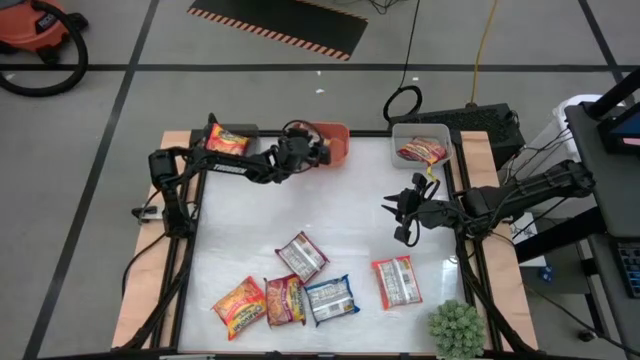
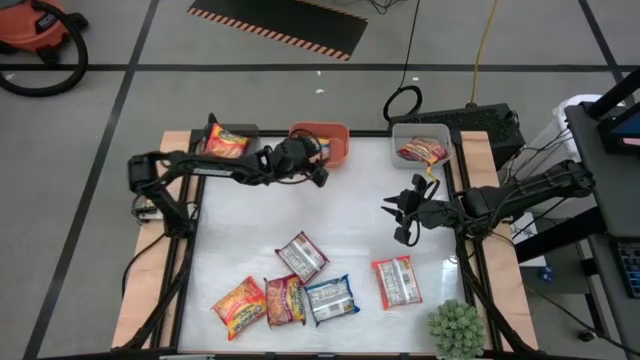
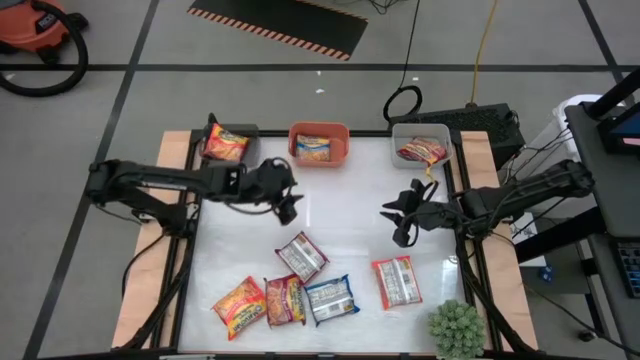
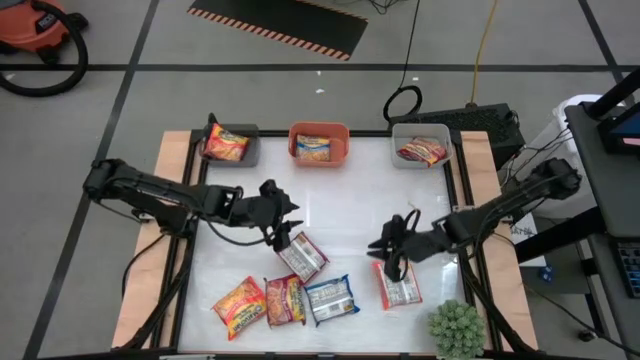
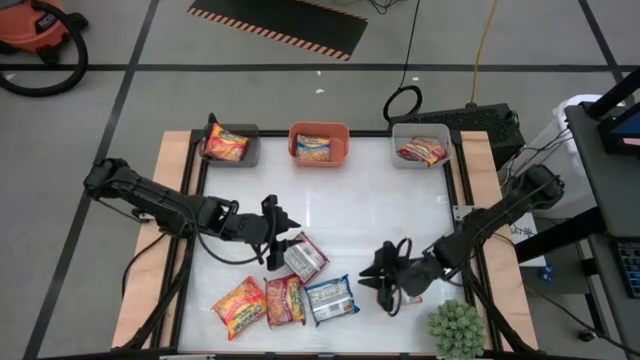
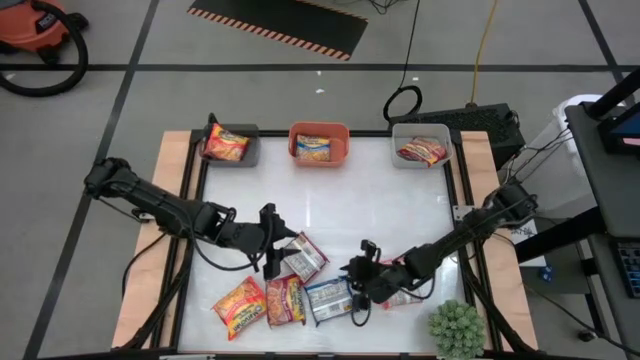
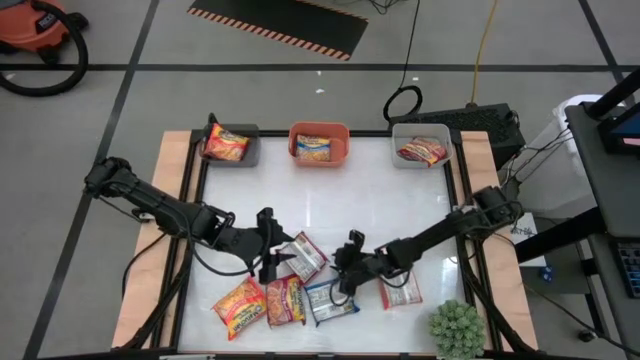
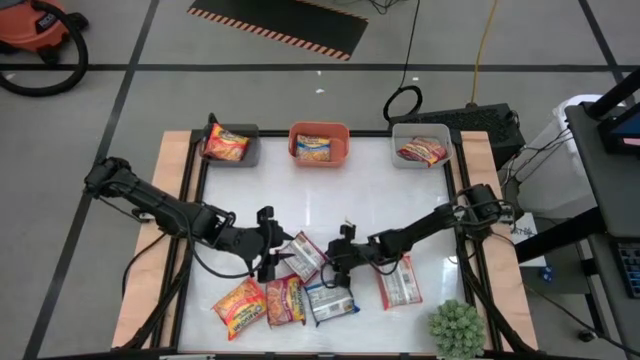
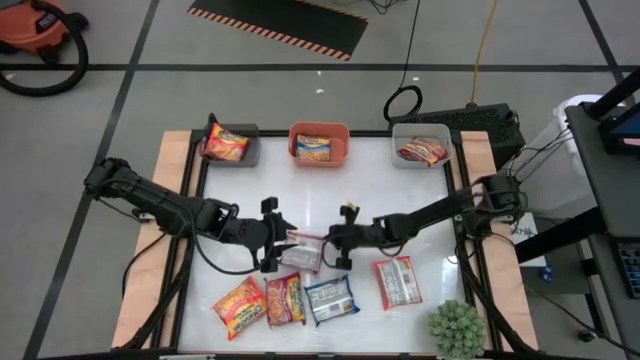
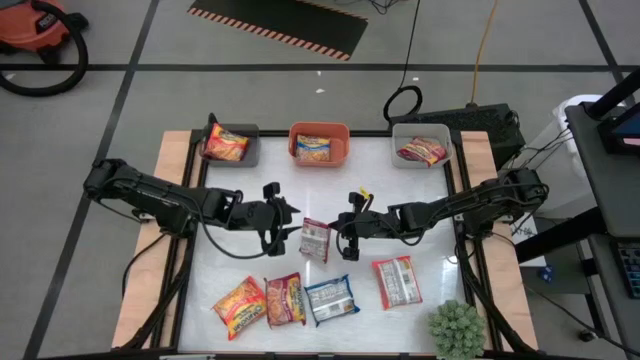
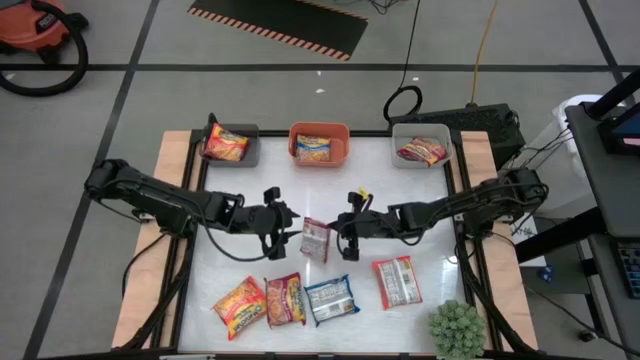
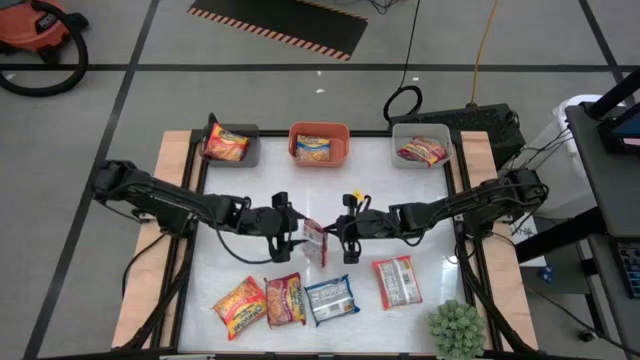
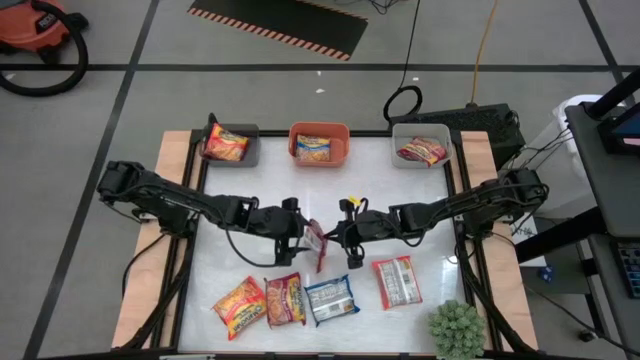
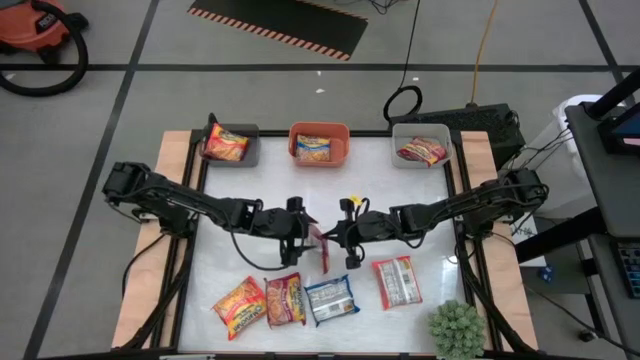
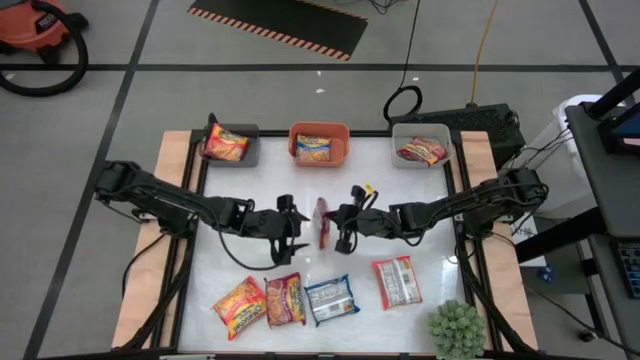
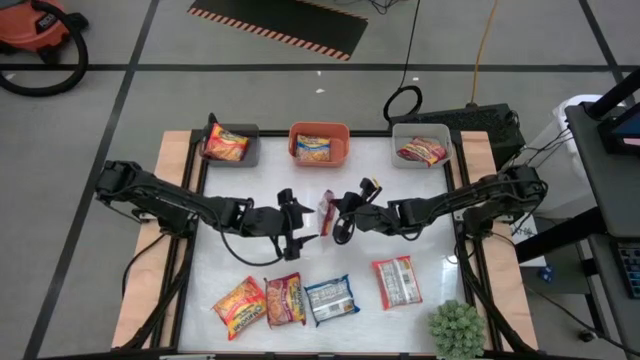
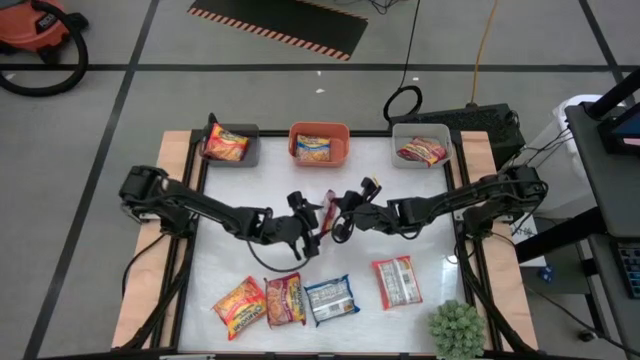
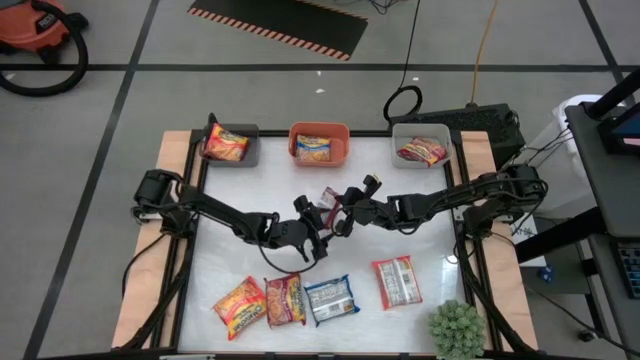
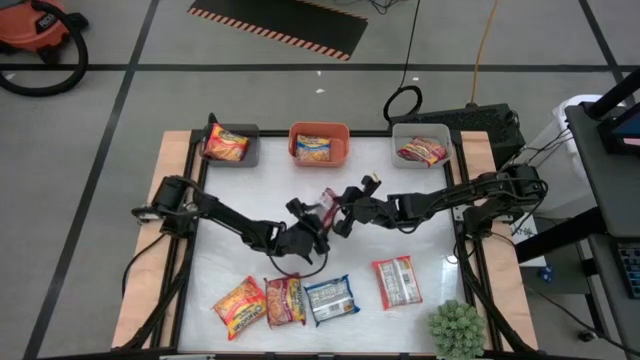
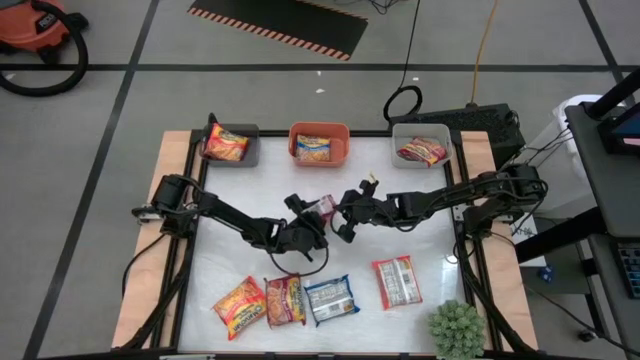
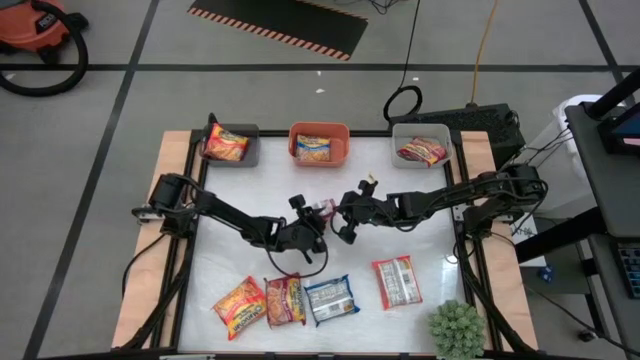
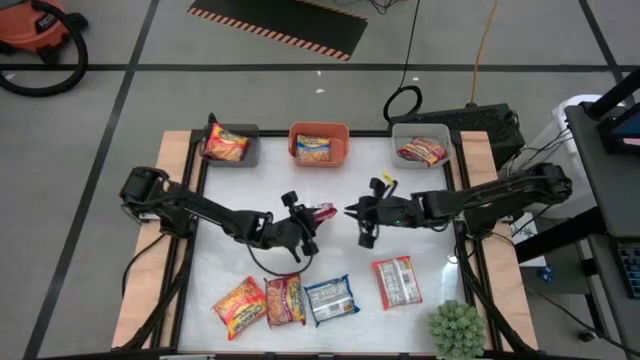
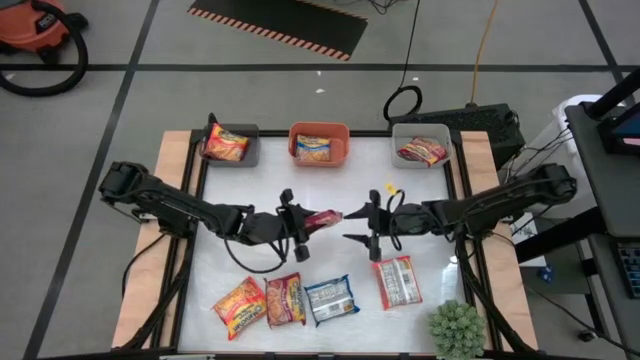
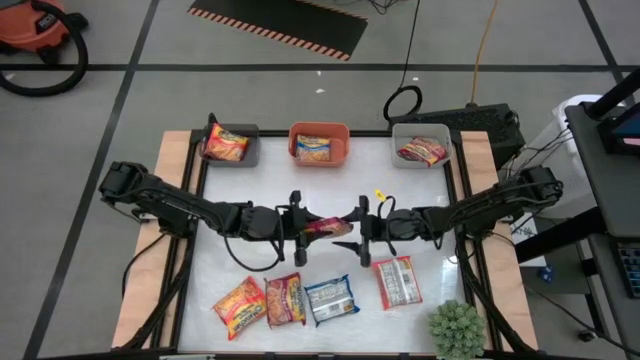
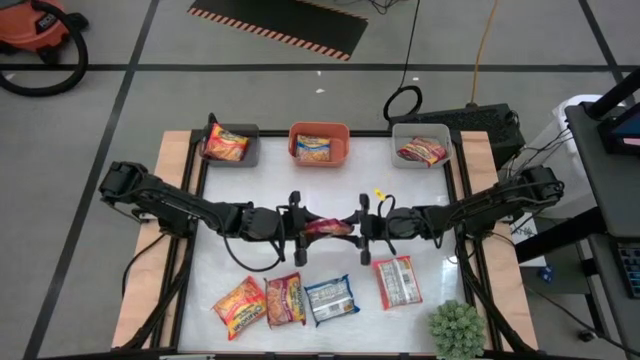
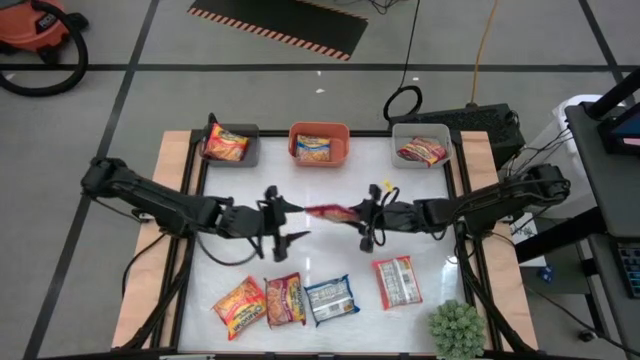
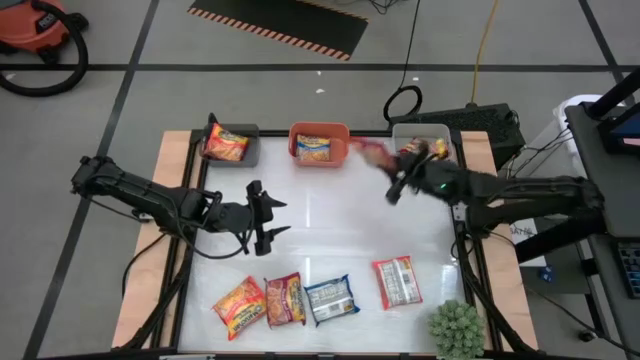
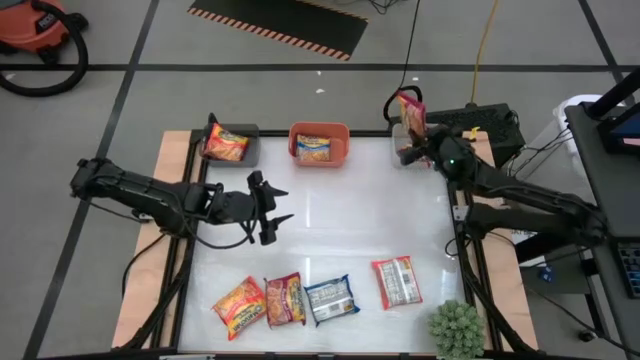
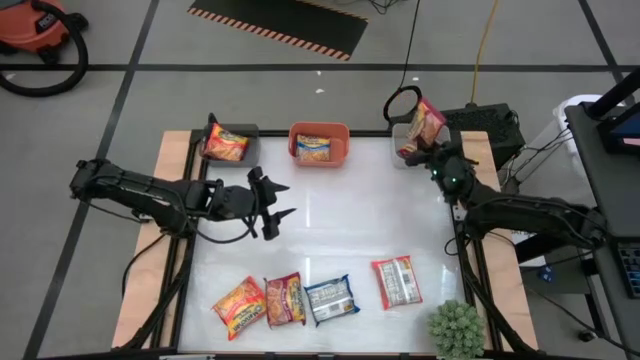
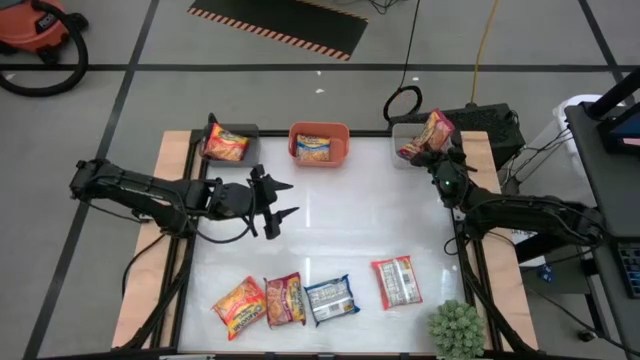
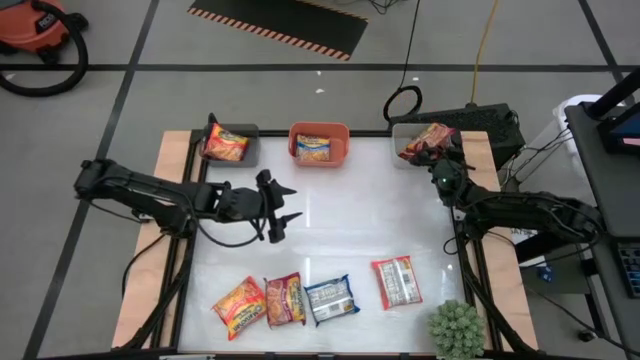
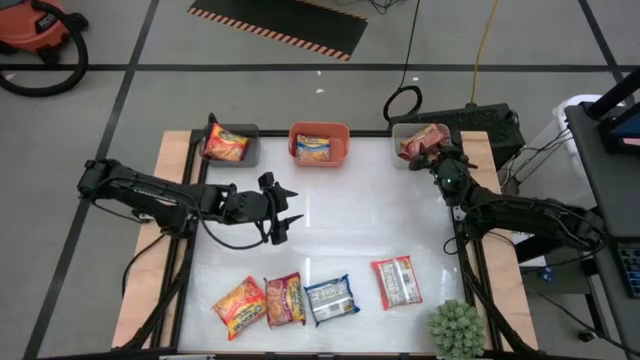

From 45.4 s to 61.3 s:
Task: Sort Maruchan noodles
Put the top red noodle pack into the gray bin
